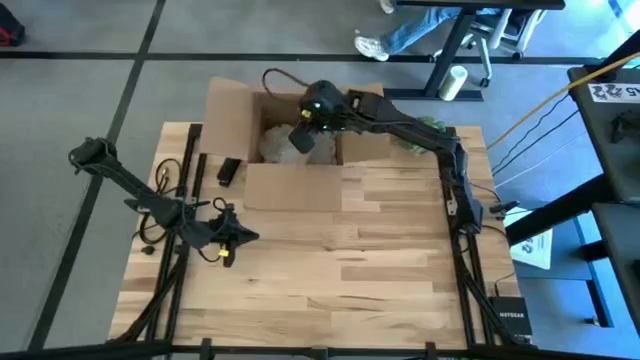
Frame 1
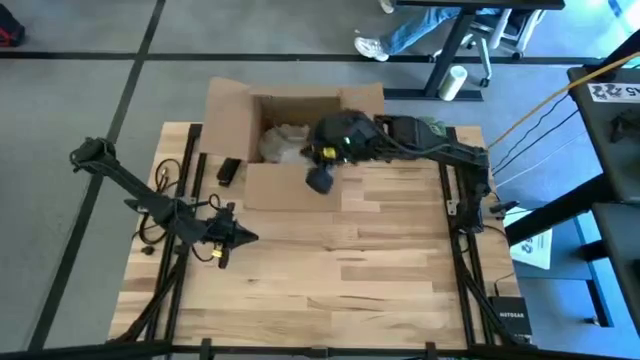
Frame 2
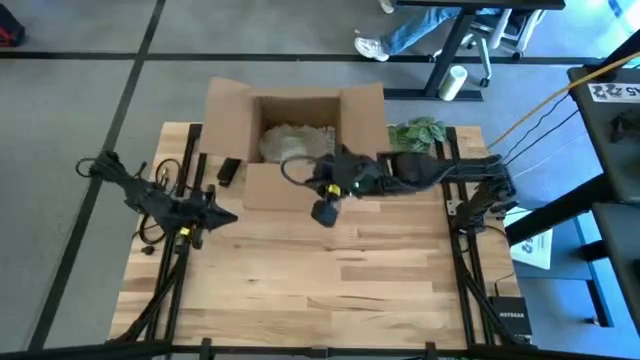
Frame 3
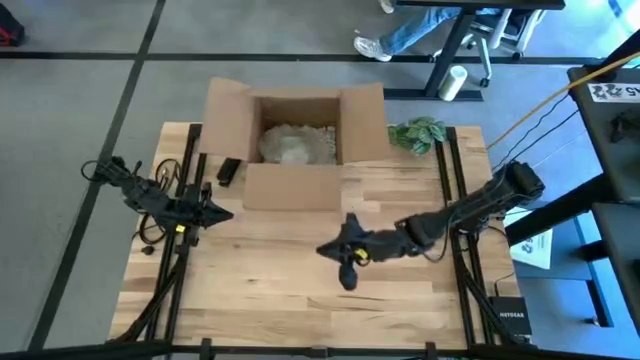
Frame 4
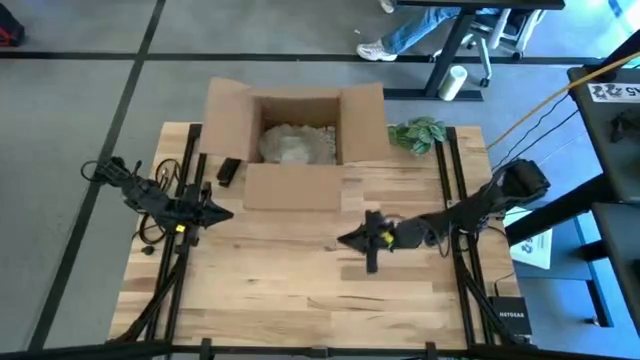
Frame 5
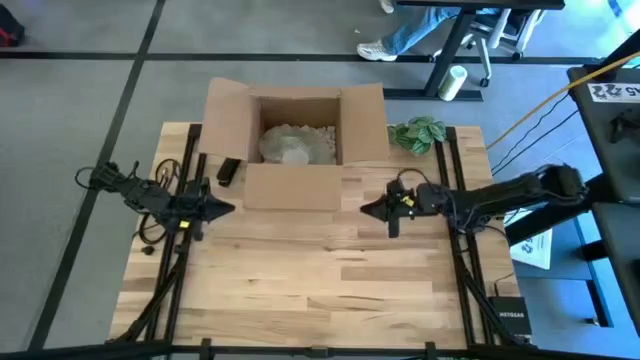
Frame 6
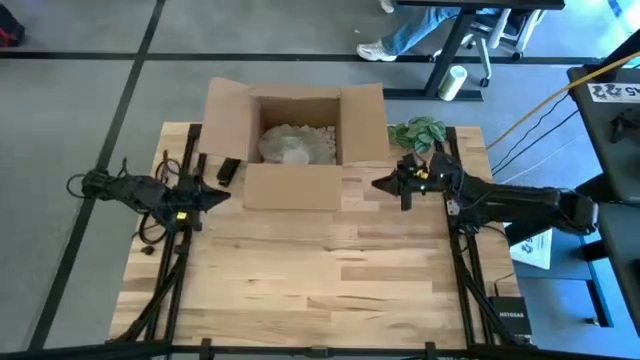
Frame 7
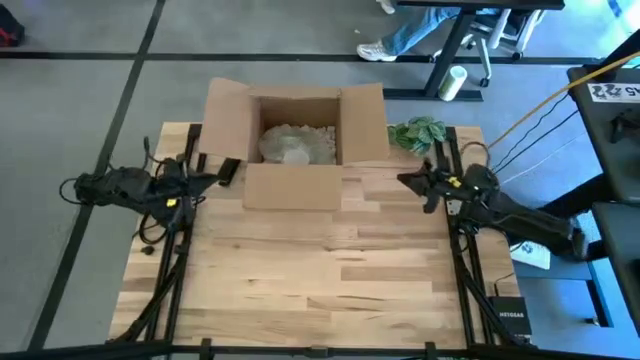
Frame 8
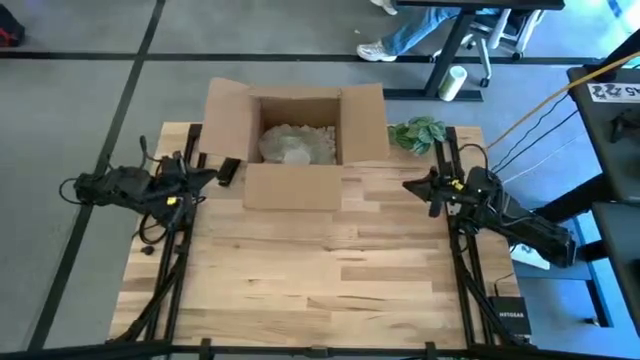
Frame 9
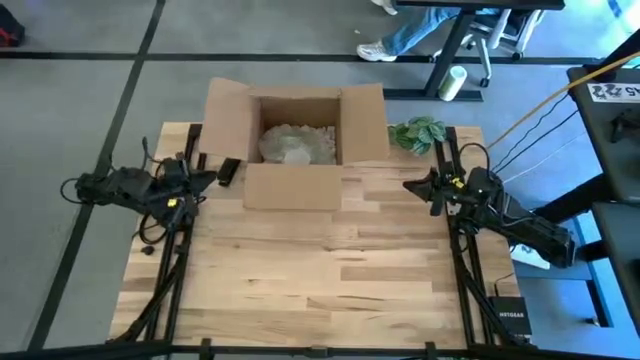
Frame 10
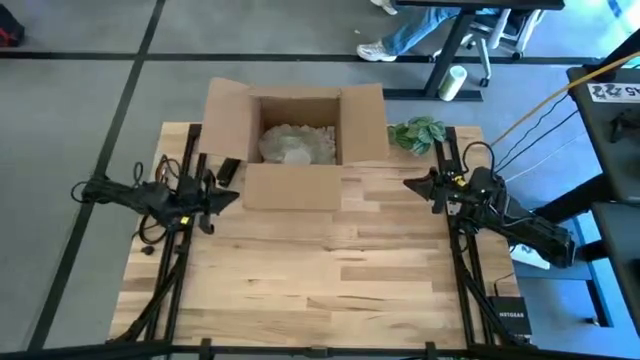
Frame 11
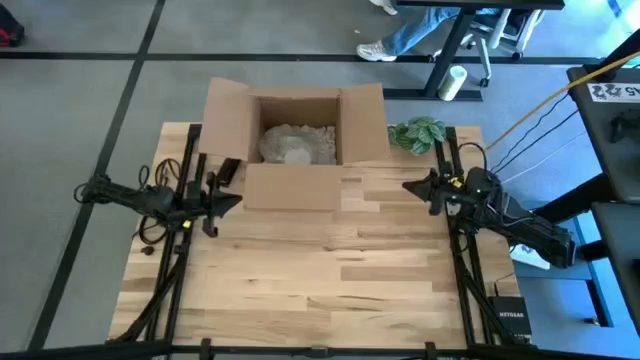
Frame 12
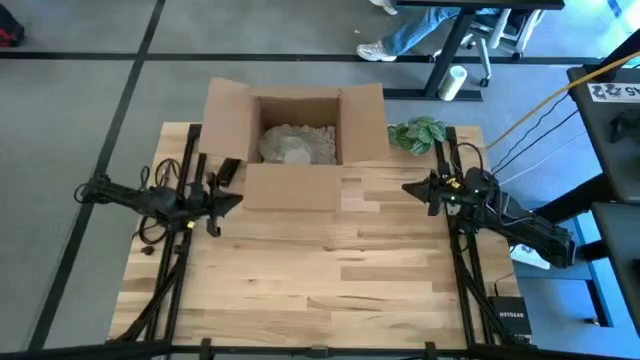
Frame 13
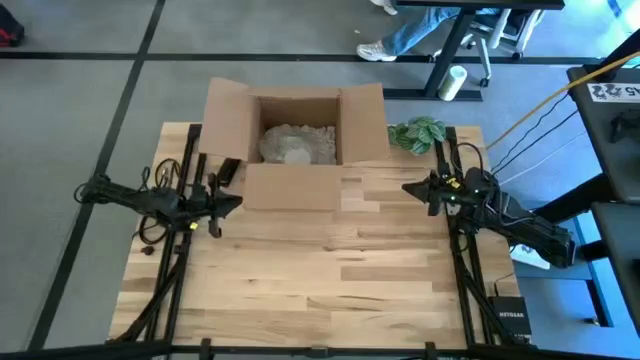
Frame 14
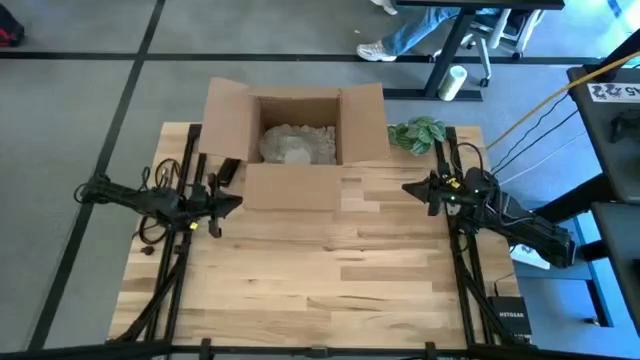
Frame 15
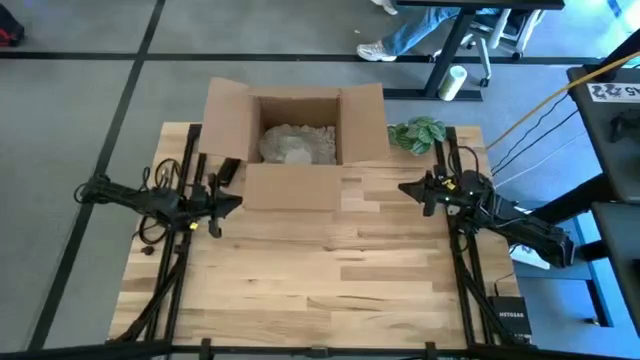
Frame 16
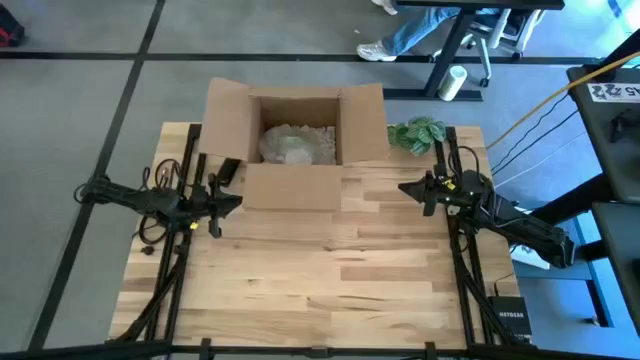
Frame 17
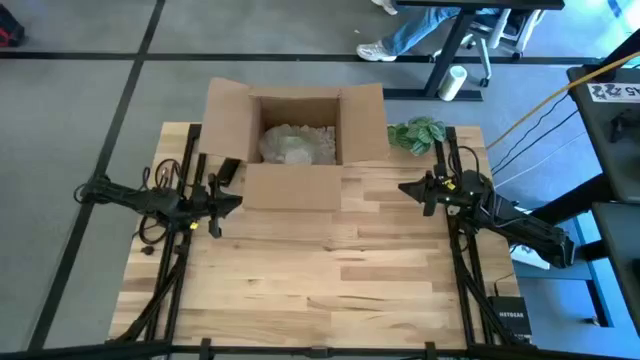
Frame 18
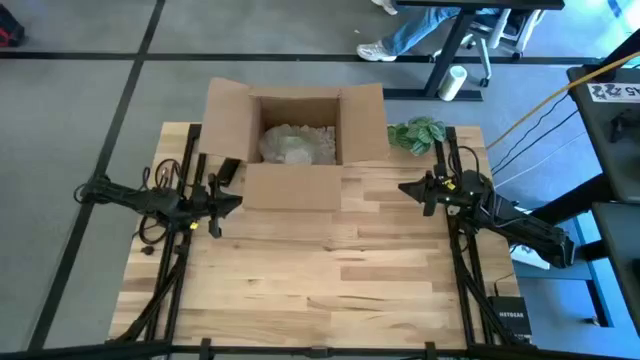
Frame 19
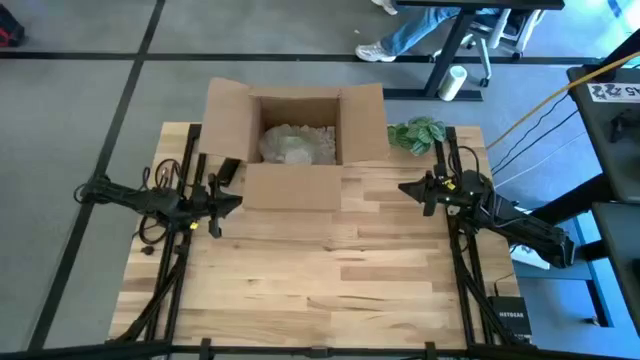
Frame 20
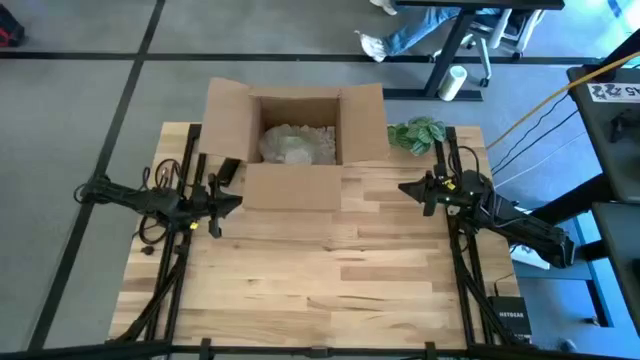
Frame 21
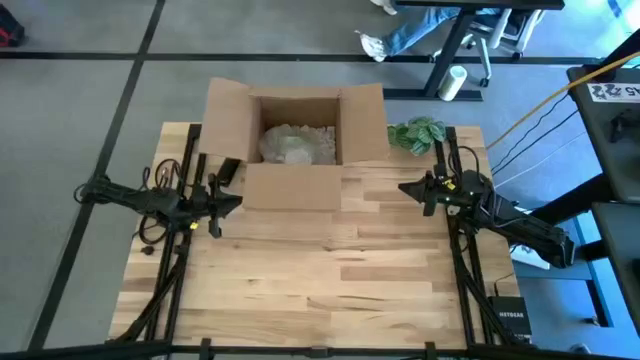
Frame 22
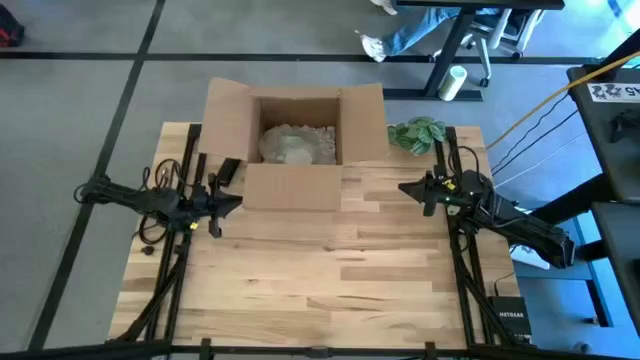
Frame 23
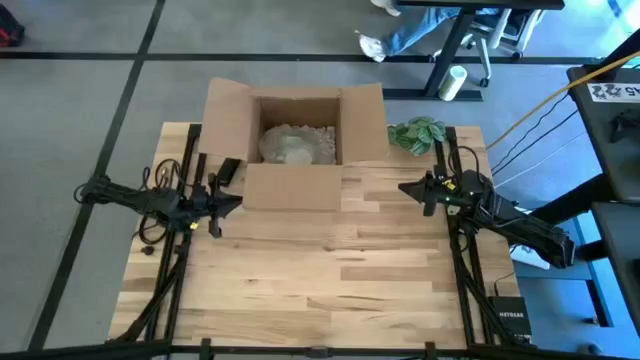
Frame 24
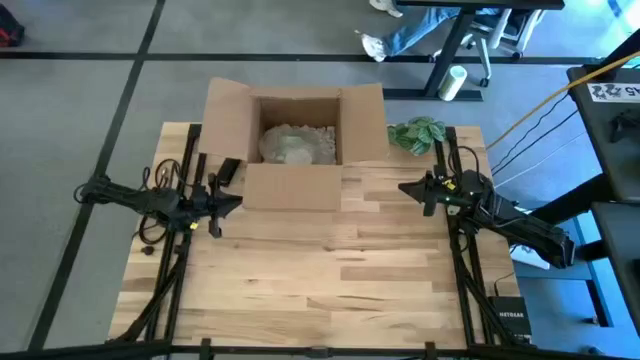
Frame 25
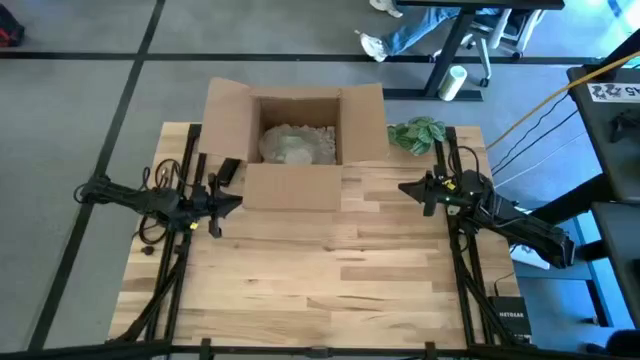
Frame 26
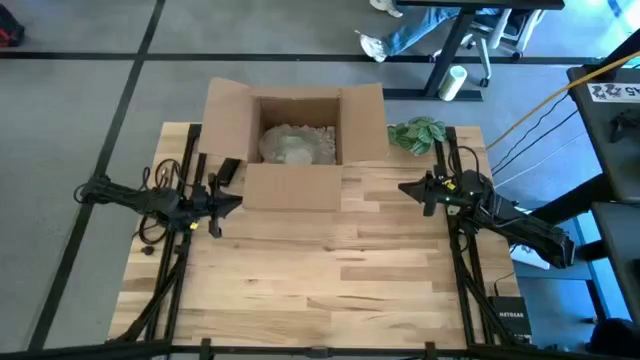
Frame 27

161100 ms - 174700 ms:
Task: wrap mug
Return to Home Position

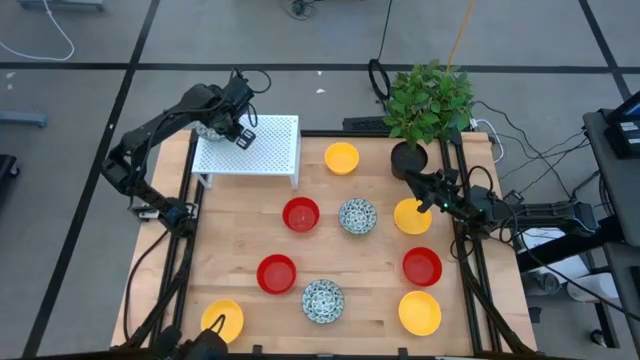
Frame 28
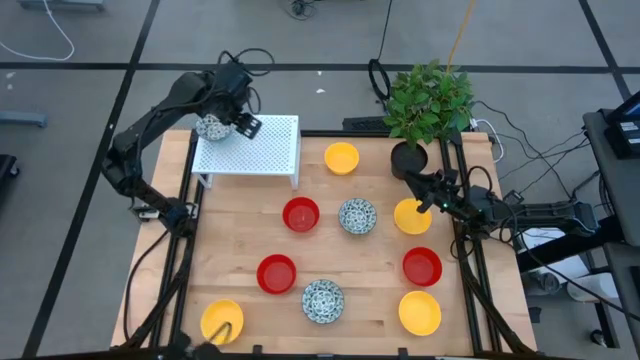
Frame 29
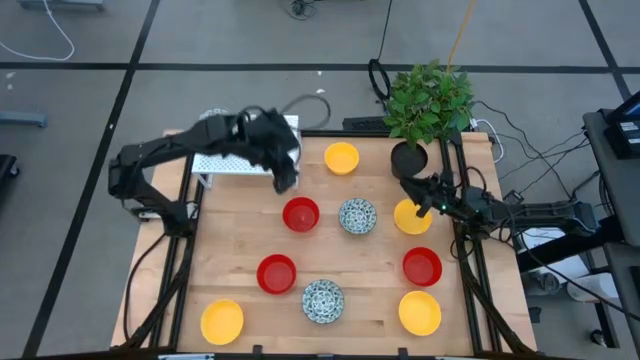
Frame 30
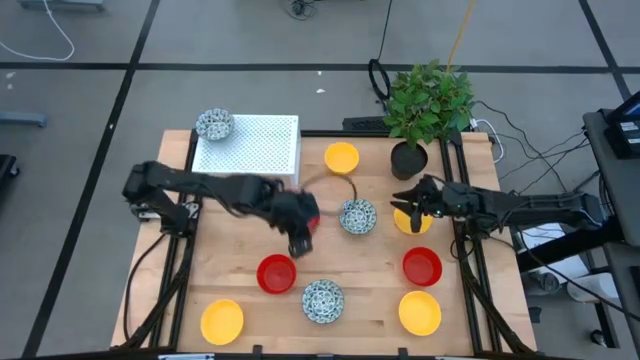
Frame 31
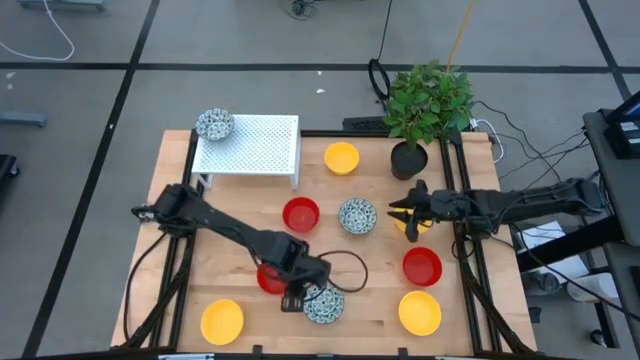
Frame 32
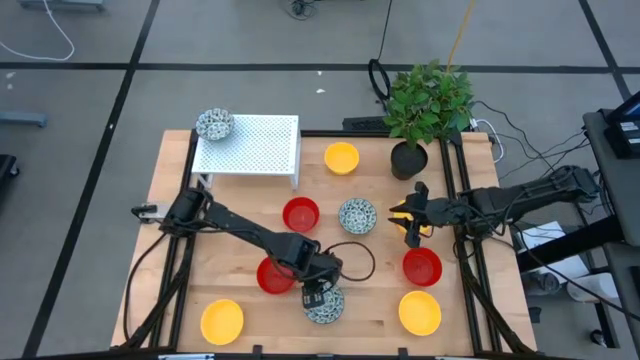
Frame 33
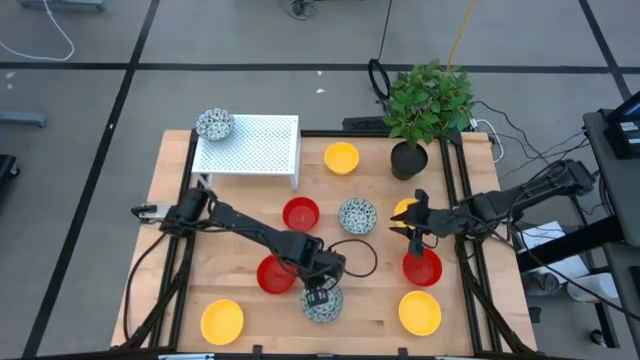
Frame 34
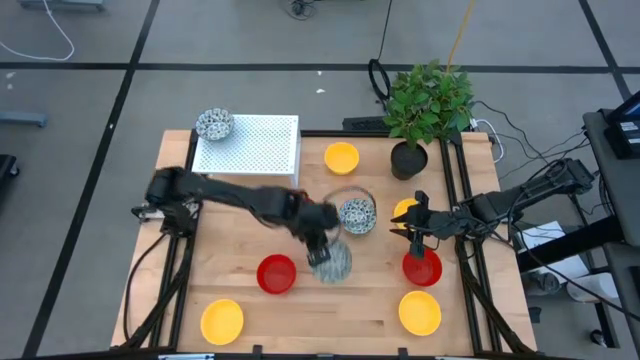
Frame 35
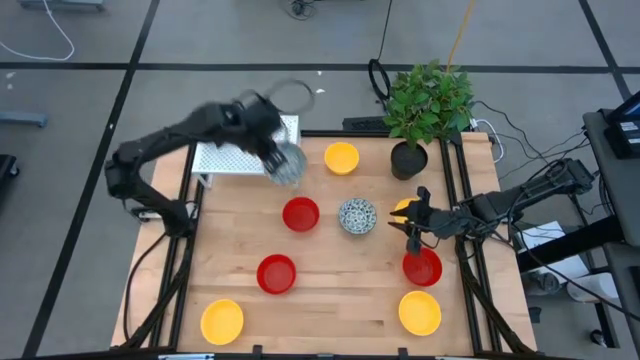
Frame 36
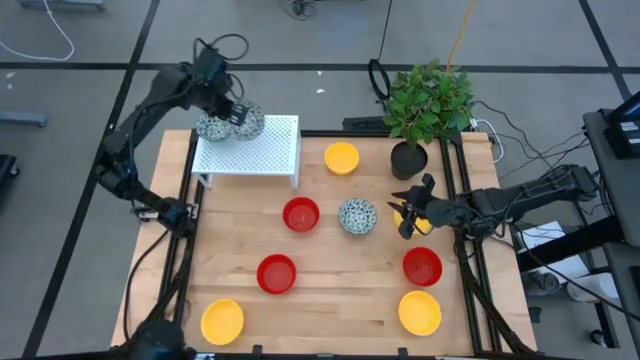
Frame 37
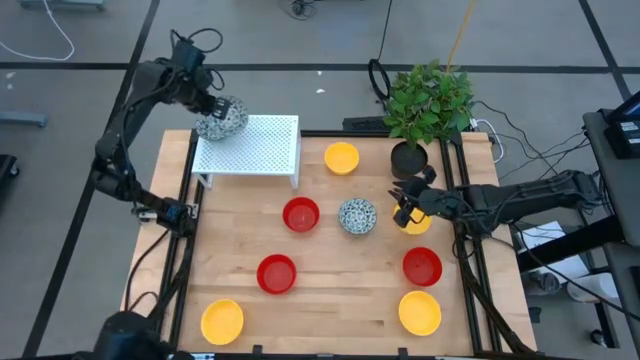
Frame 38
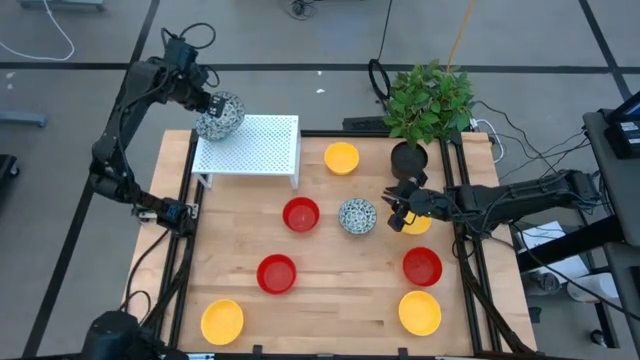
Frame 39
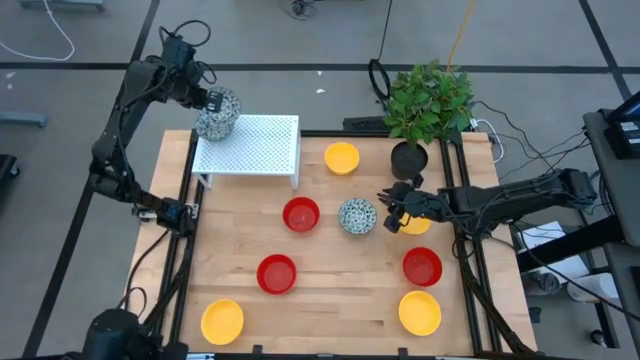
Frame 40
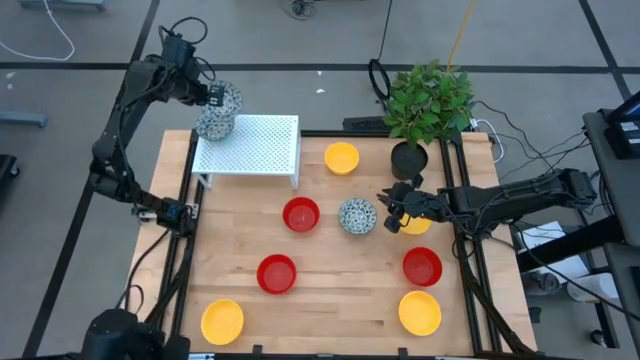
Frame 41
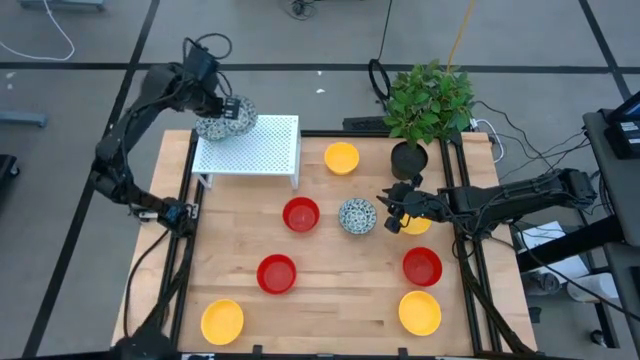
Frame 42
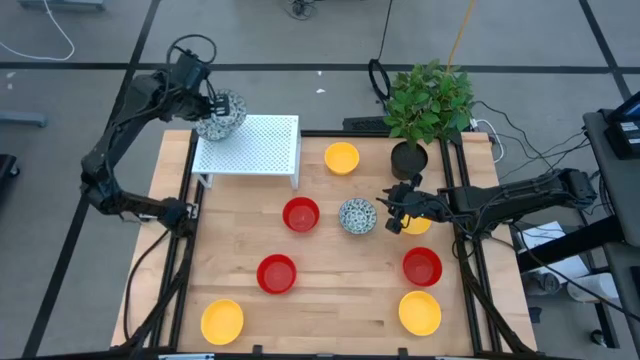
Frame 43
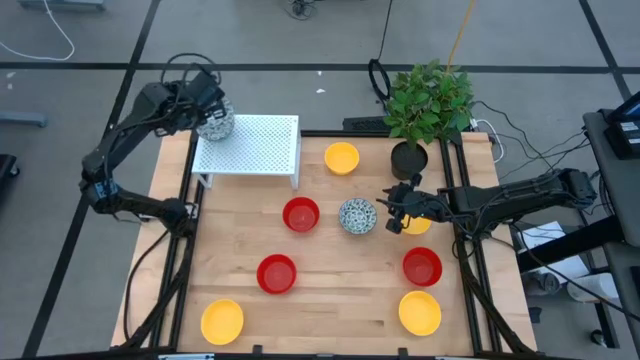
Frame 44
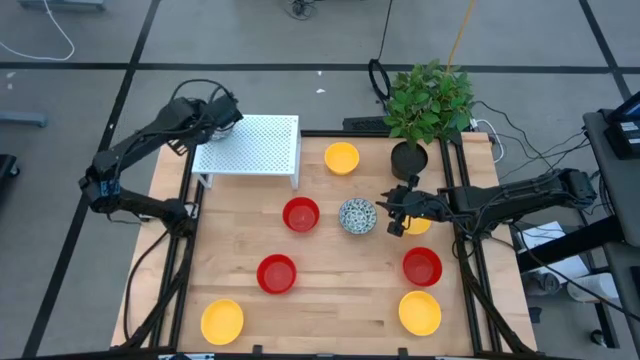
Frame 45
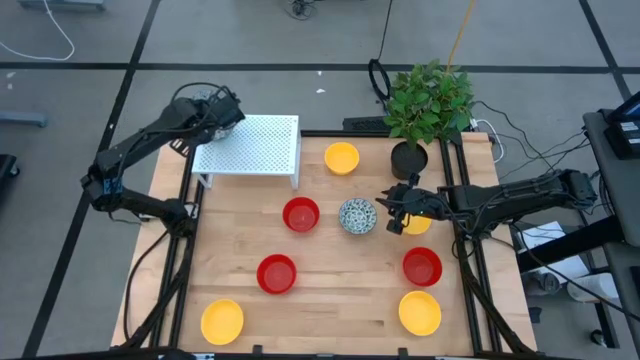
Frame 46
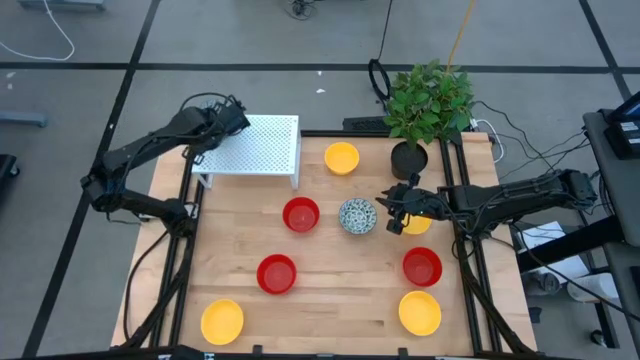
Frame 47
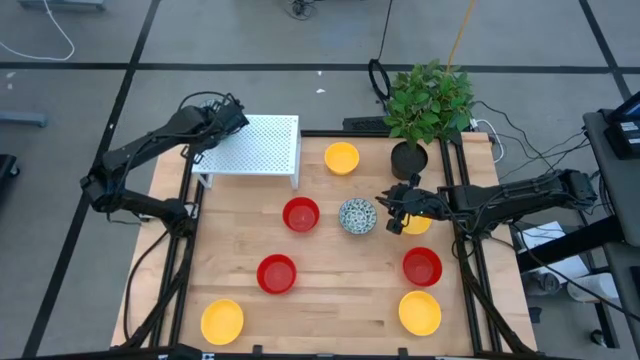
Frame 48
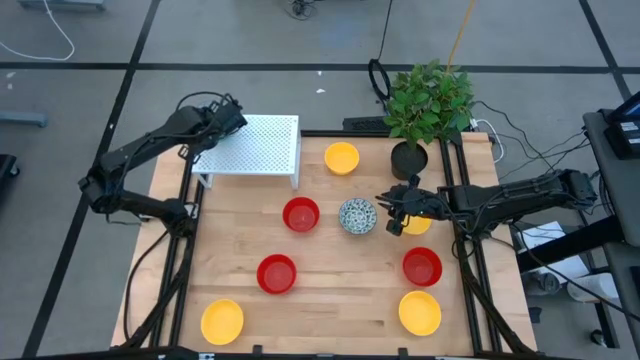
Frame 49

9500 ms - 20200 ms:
Task: Pick & Place Mini bowls
Stack the bottom blue patterned bowl on top of the blue patterned bowl on the shelf
